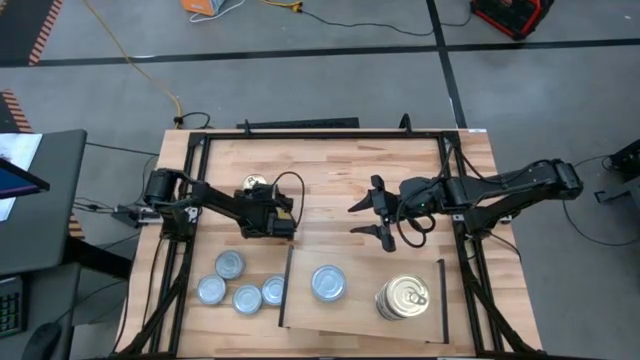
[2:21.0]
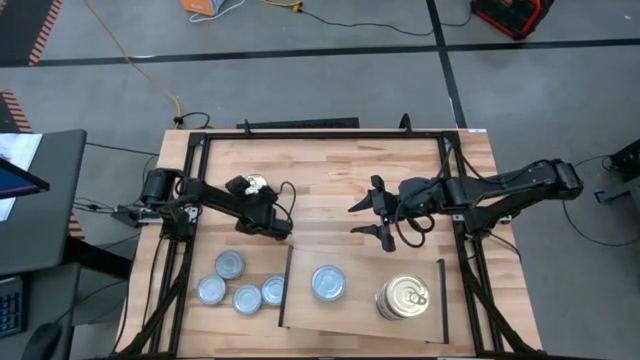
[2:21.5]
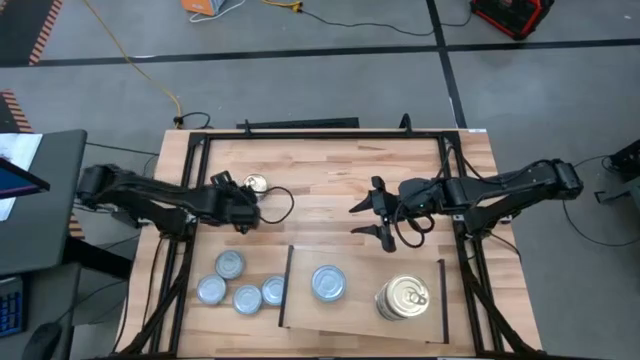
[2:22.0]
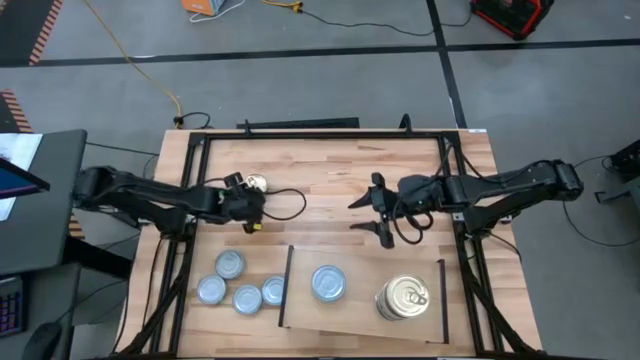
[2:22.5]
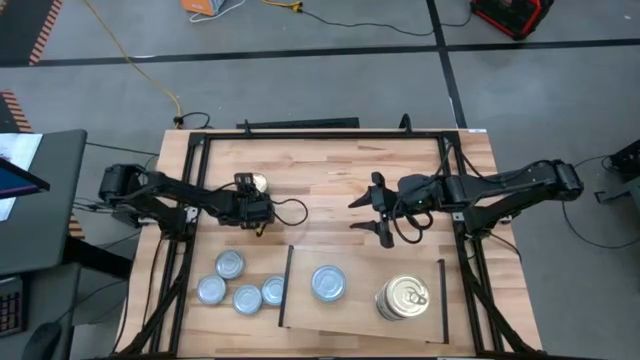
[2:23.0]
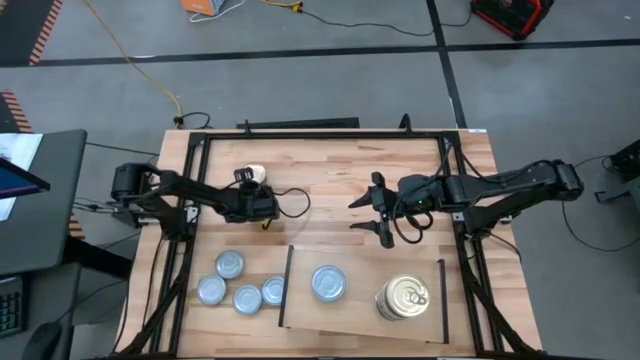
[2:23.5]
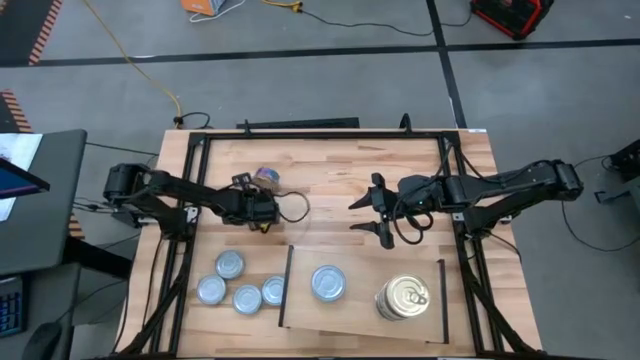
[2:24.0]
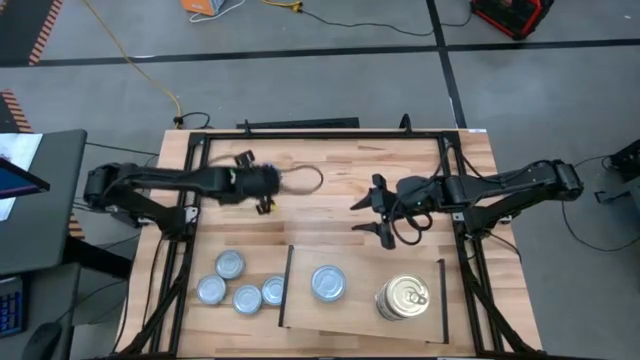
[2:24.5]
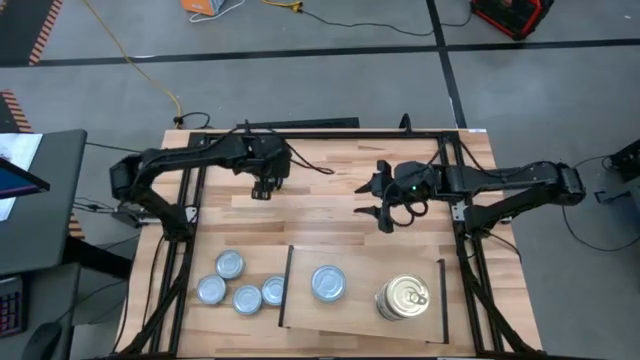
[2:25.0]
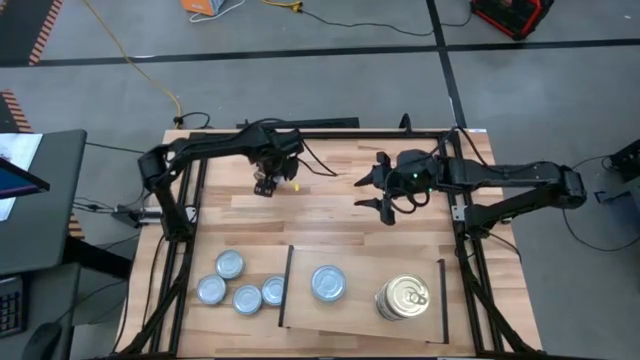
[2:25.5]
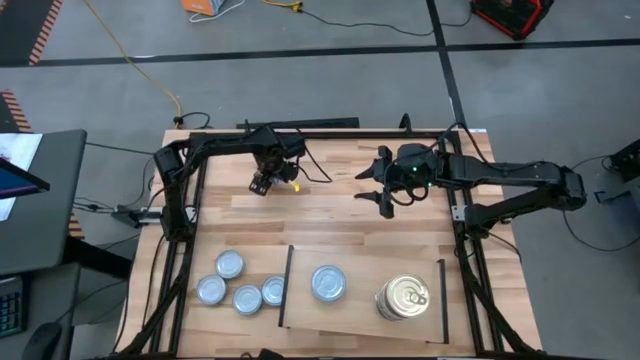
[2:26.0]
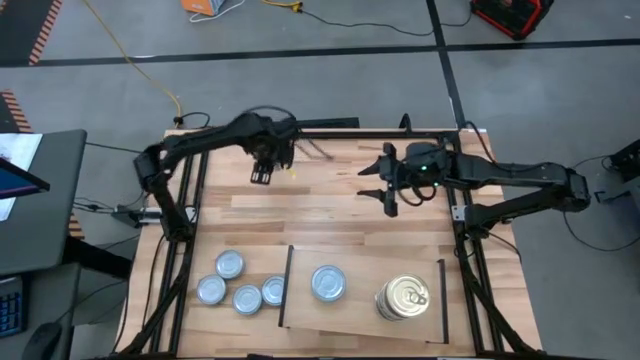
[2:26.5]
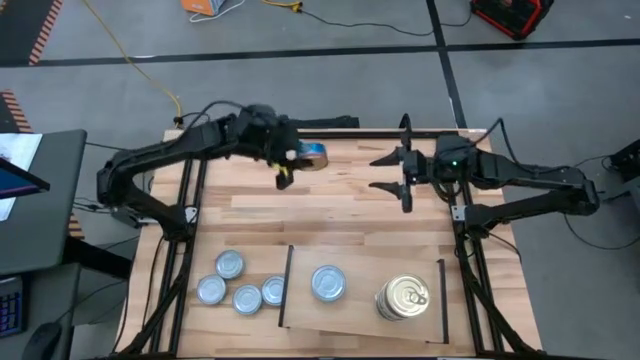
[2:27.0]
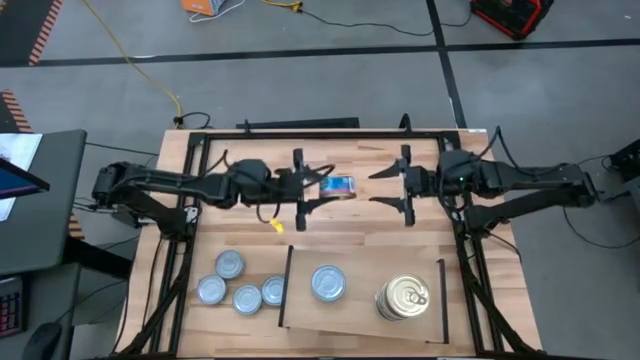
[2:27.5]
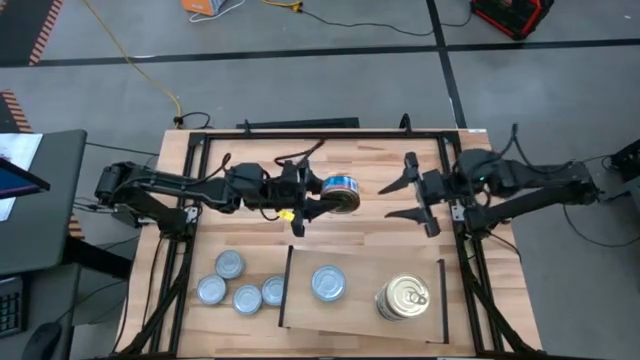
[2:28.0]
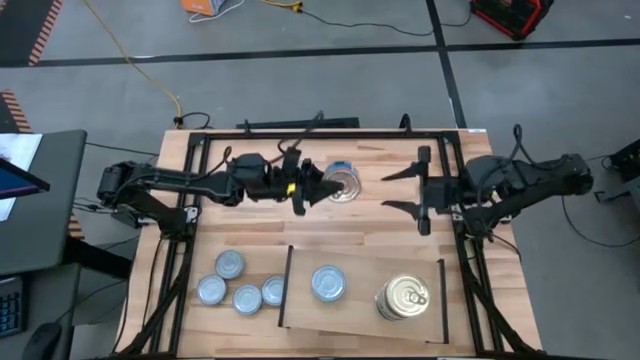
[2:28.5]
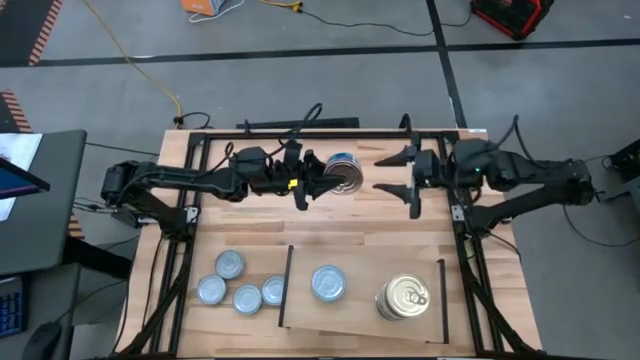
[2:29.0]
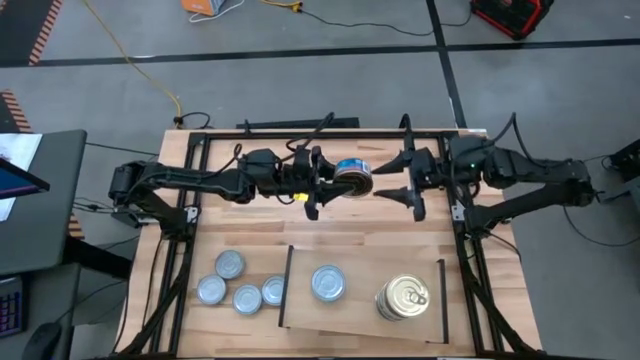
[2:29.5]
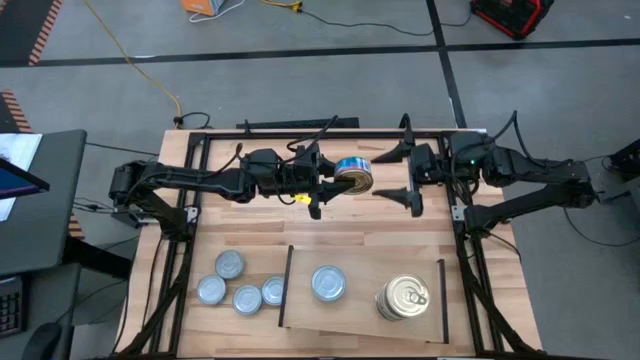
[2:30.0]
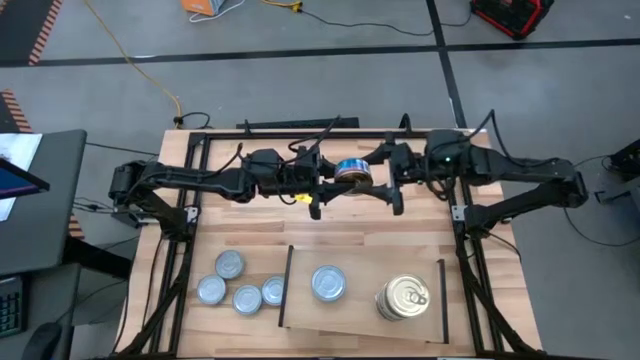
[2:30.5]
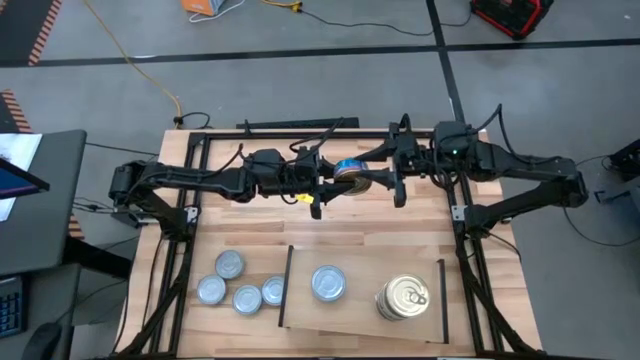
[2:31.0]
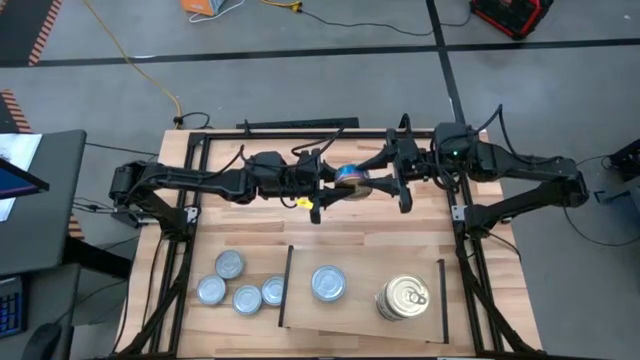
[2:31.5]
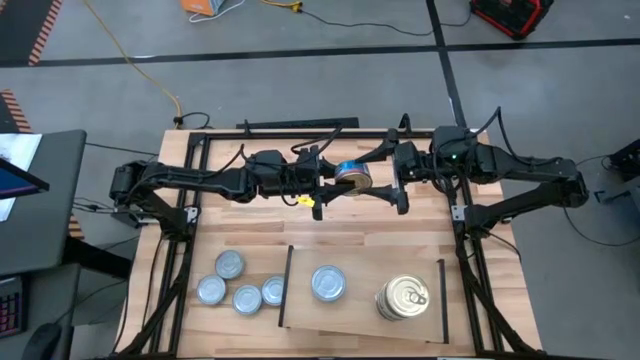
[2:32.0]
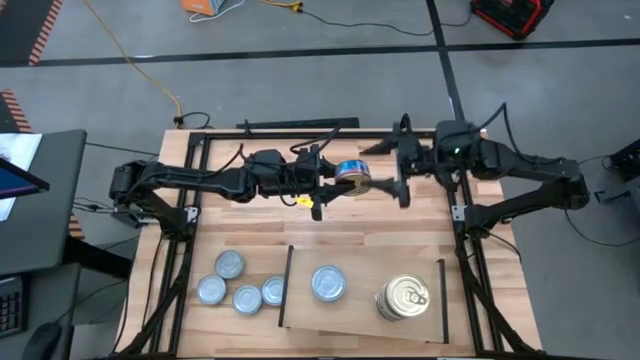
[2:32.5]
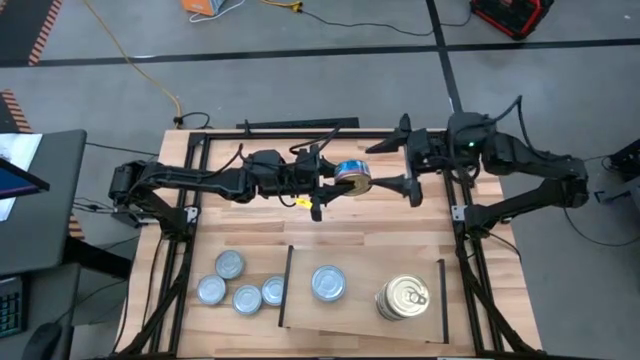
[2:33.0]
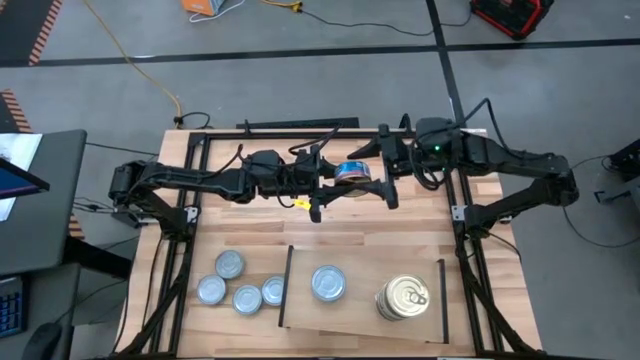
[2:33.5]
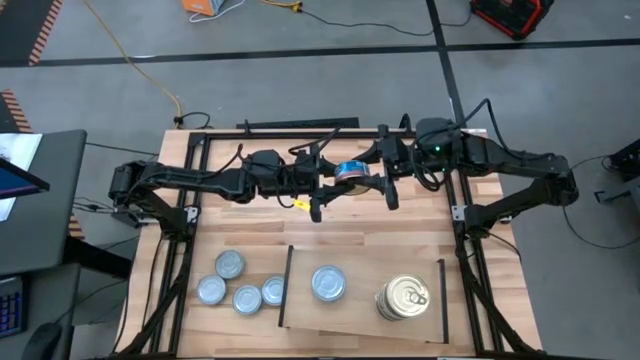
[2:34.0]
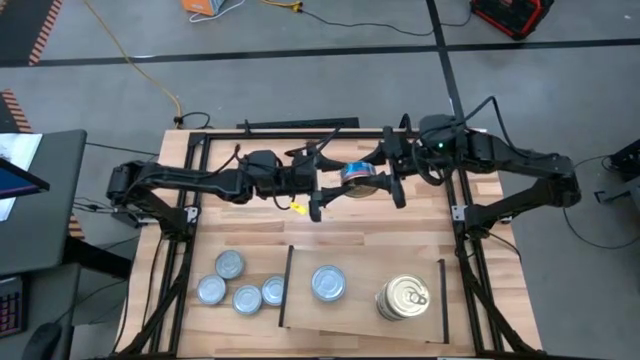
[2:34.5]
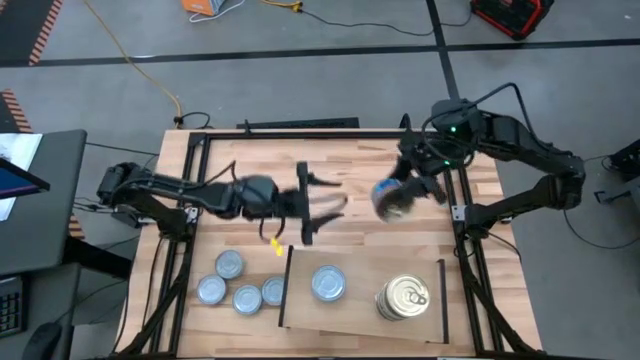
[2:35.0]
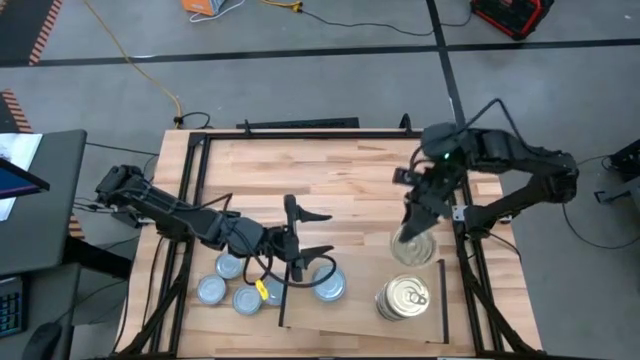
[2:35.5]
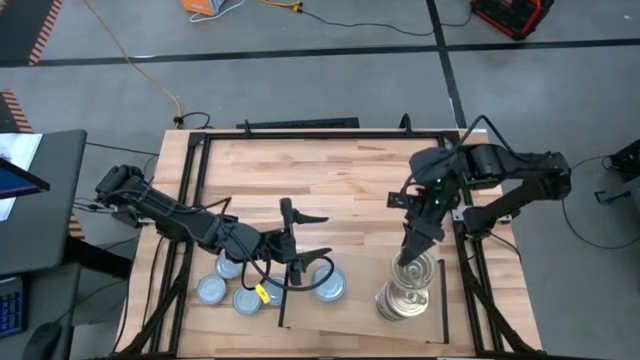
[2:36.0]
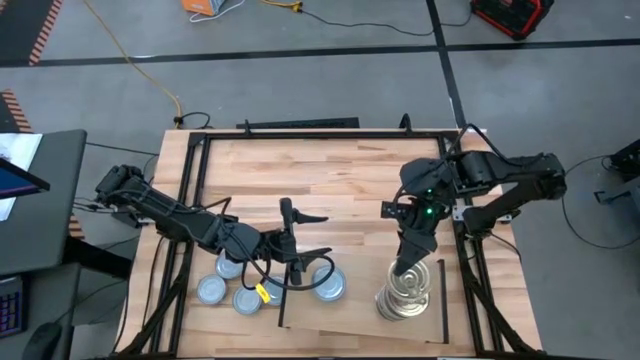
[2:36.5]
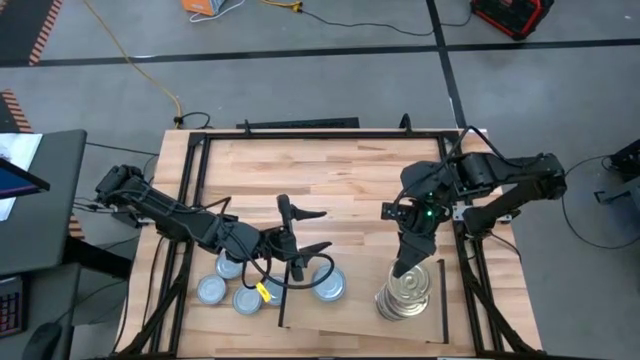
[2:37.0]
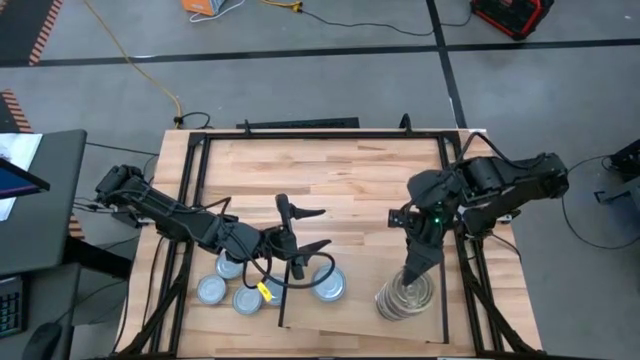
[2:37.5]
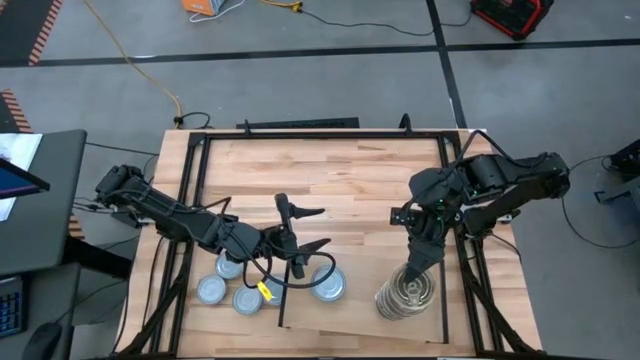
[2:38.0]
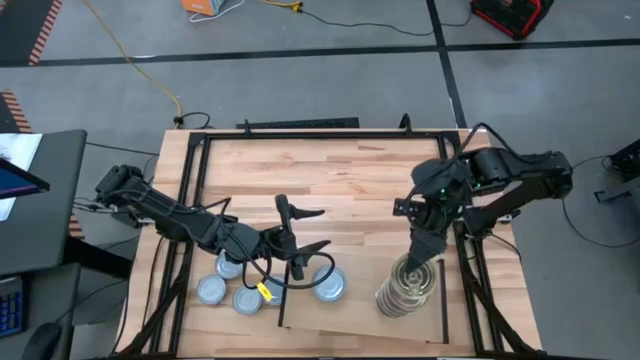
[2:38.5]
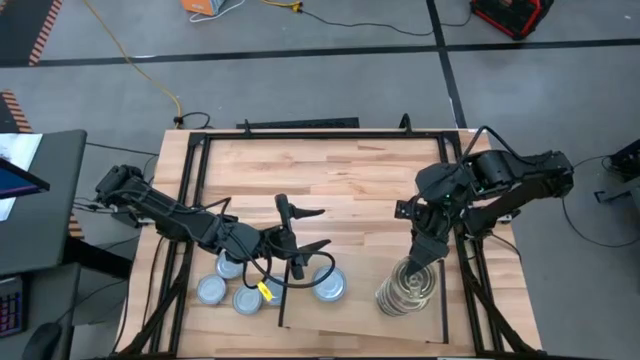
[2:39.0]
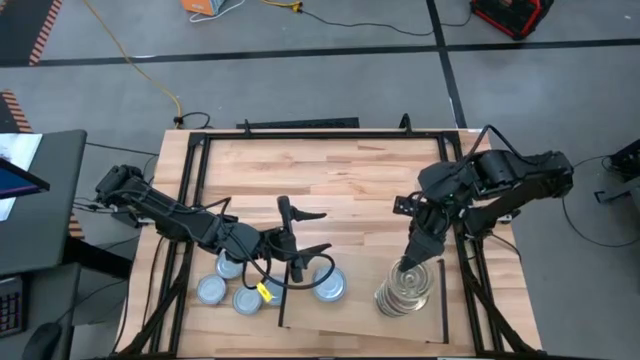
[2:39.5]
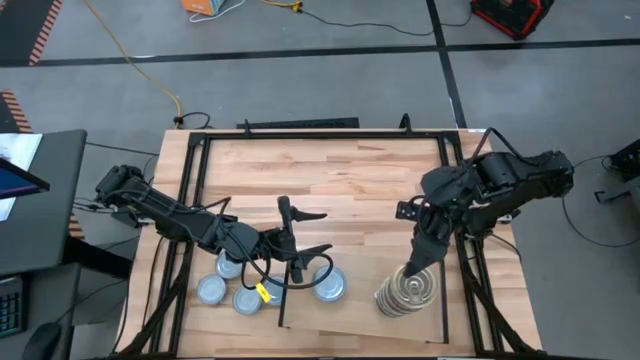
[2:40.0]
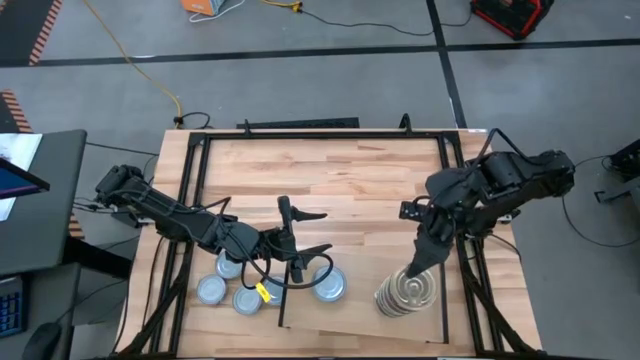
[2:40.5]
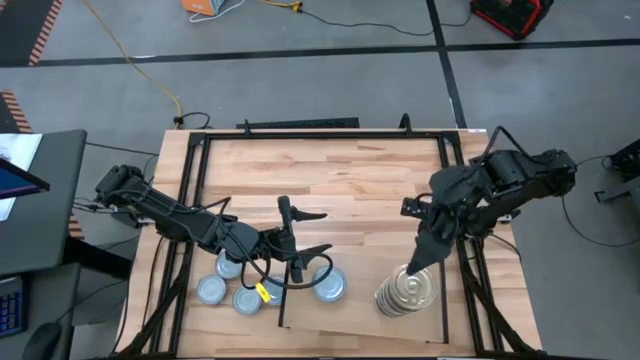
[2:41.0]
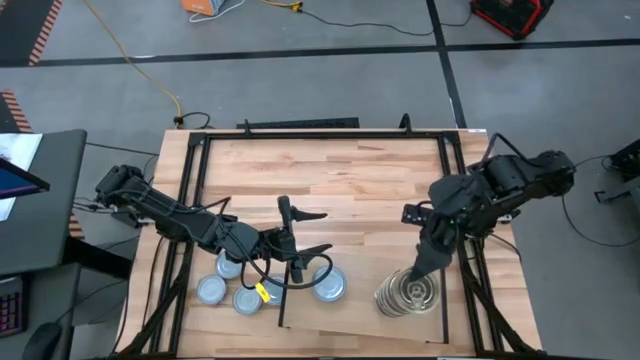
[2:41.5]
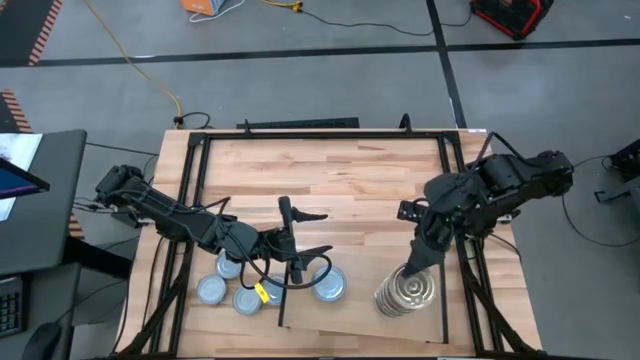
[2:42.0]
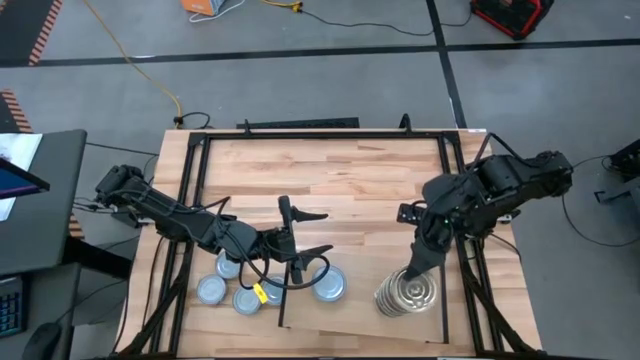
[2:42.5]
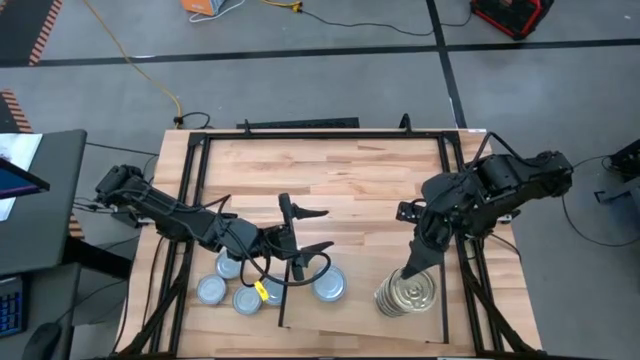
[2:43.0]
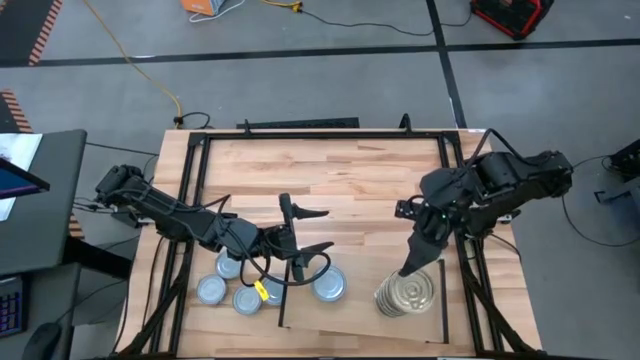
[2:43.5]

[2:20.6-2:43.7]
Task: Stack canned seafood by type on shelf
Stack the blue-pink tuna can on the top of the blue-pink tuna cans on the shelf
